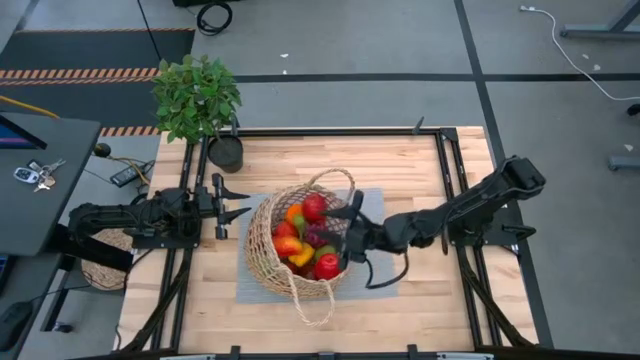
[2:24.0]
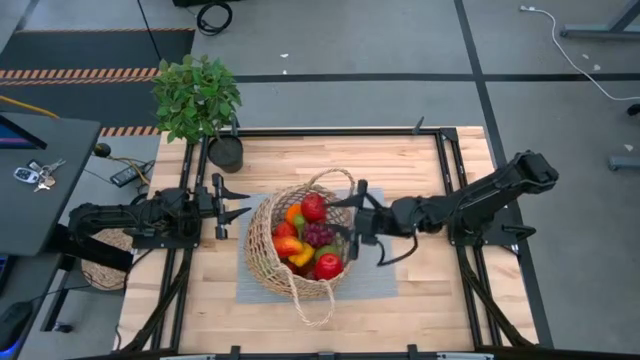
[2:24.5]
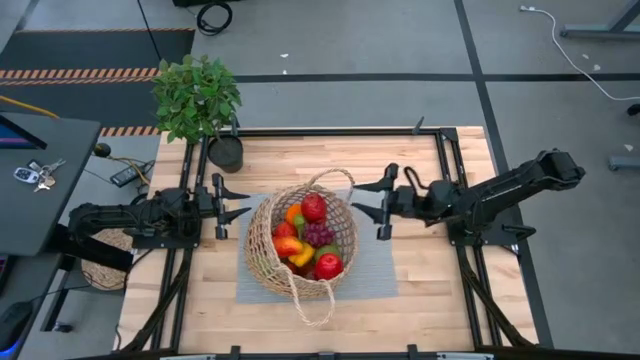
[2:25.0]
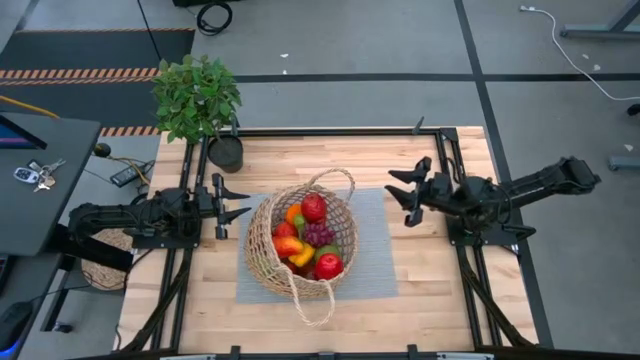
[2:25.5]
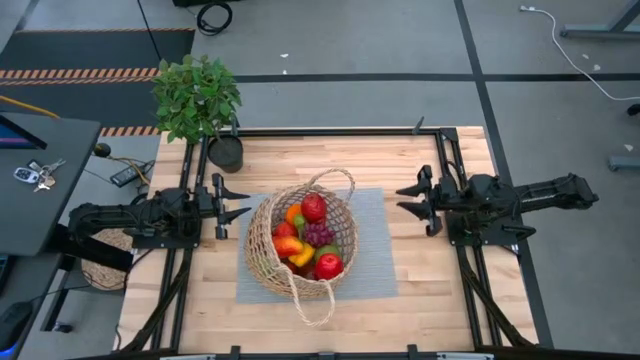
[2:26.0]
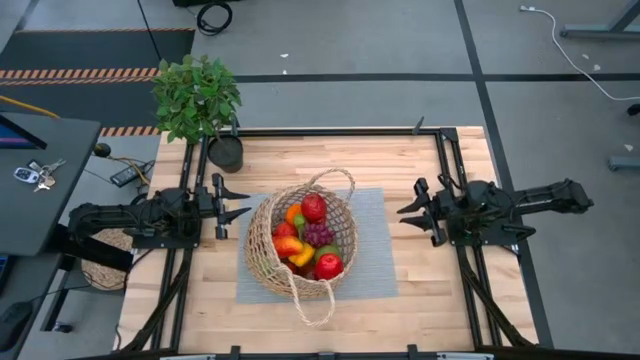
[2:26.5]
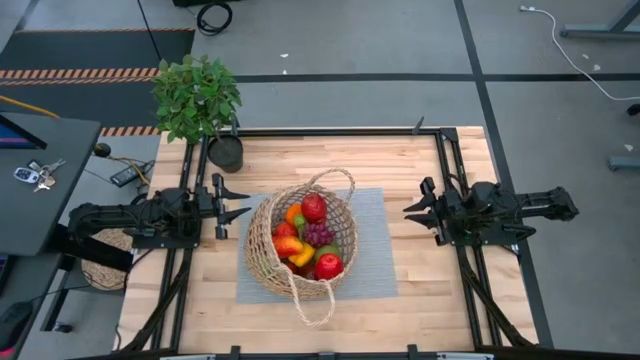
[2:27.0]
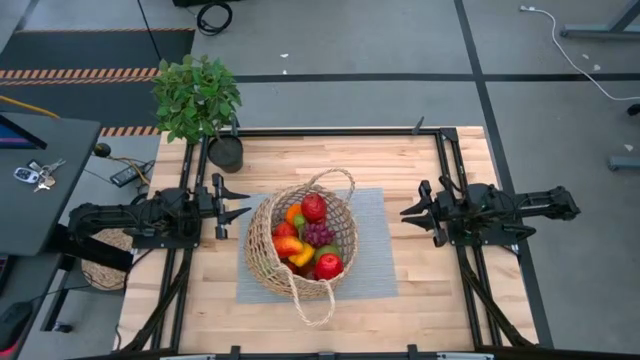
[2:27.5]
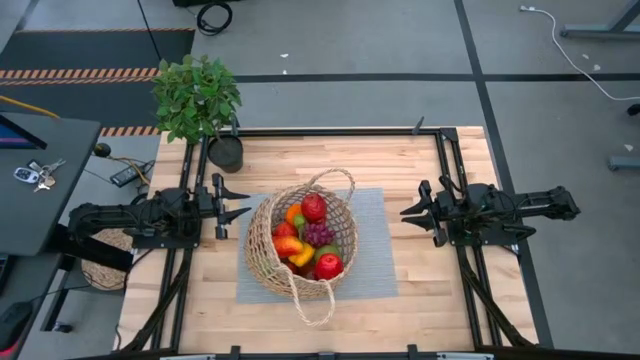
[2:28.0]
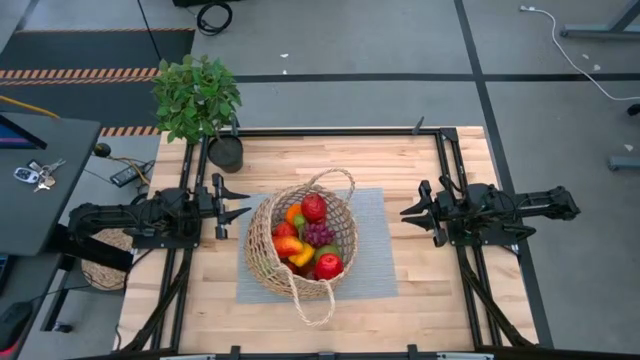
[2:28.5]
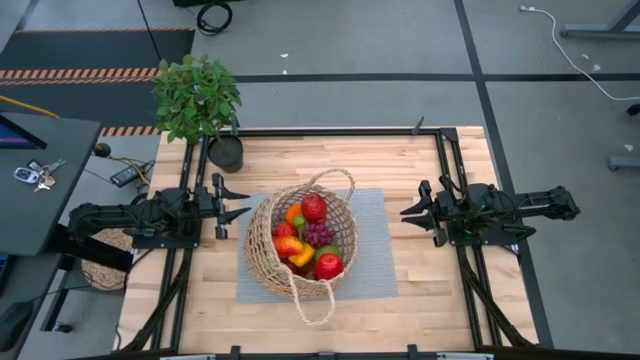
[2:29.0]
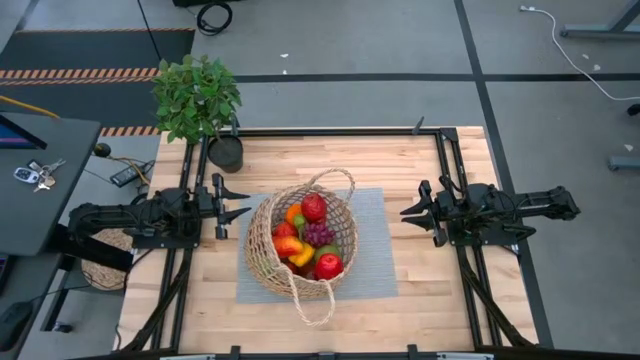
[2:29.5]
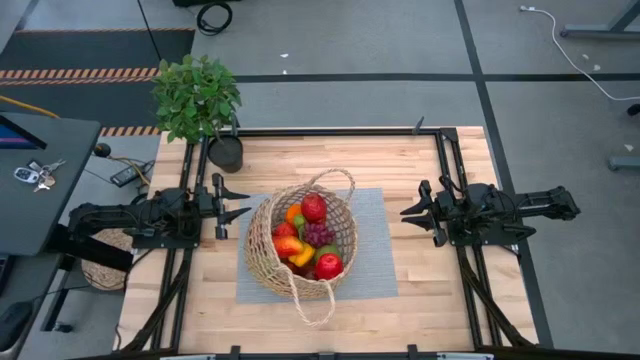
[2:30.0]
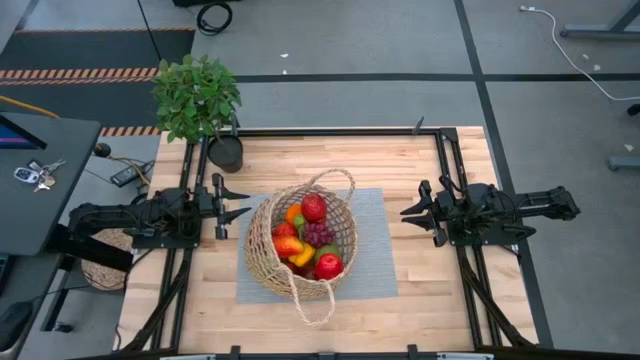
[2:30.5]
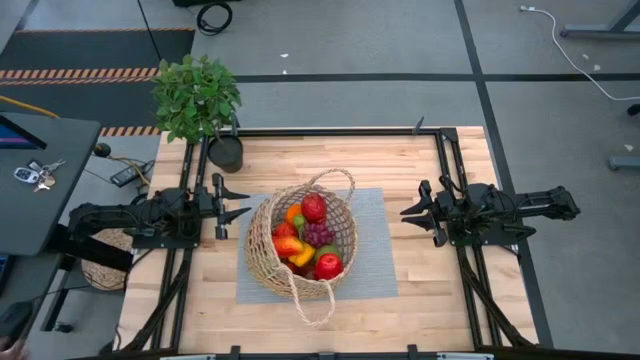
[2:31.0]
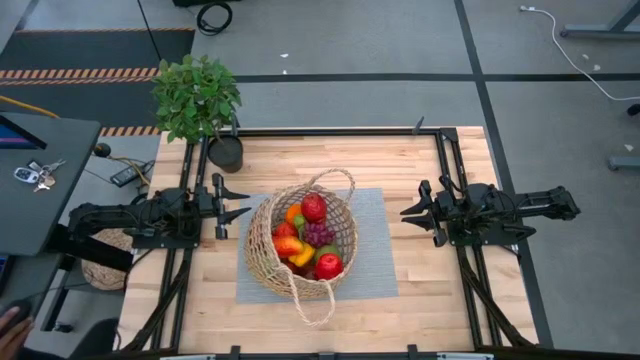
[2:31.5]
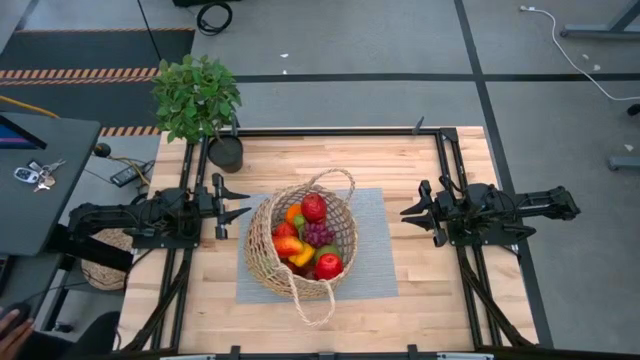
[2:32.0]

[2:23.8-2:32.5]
Task: Build produce basket
Return to Home Position

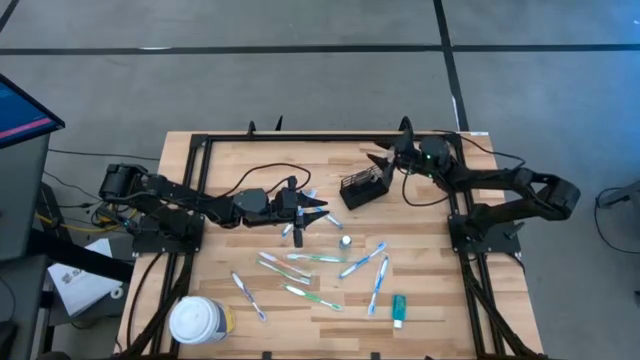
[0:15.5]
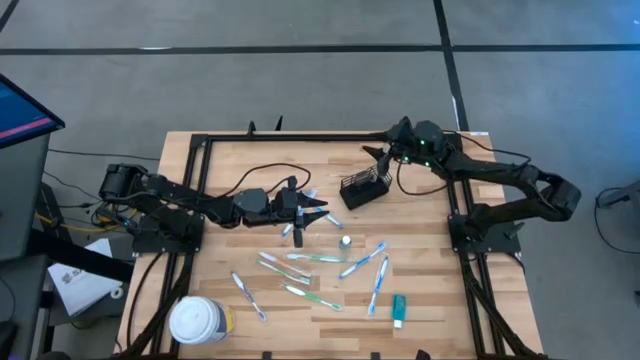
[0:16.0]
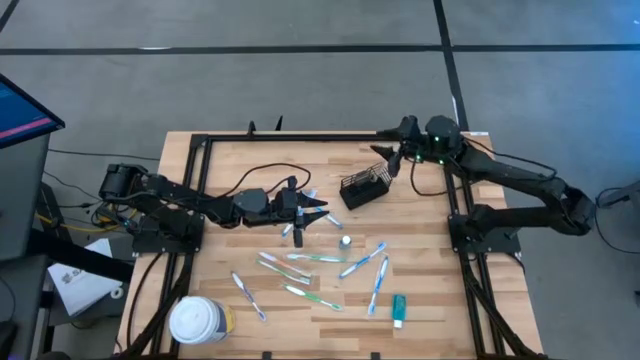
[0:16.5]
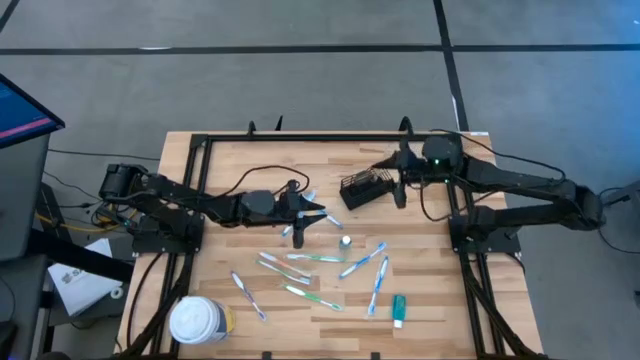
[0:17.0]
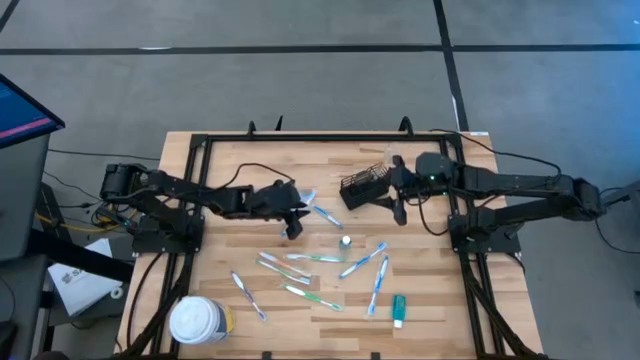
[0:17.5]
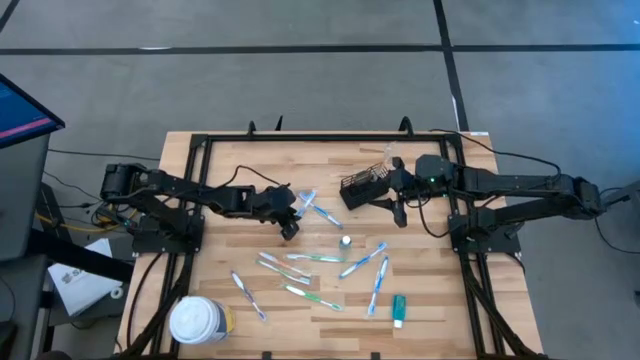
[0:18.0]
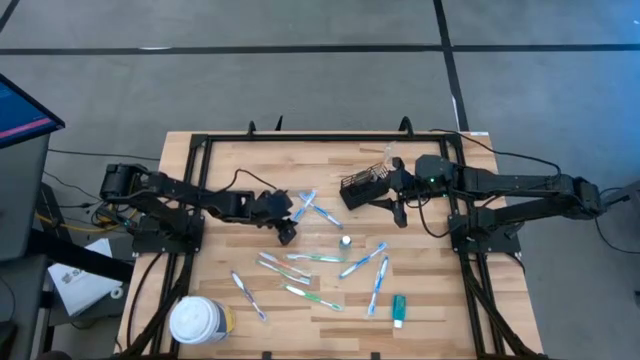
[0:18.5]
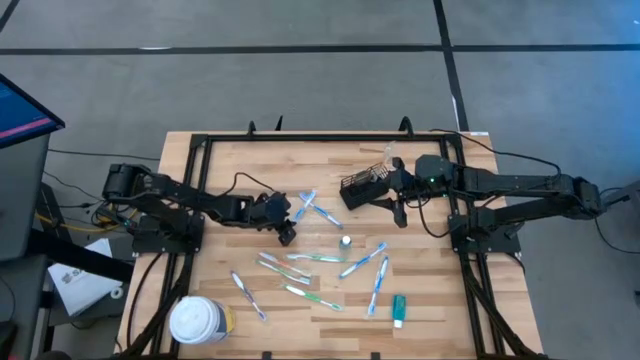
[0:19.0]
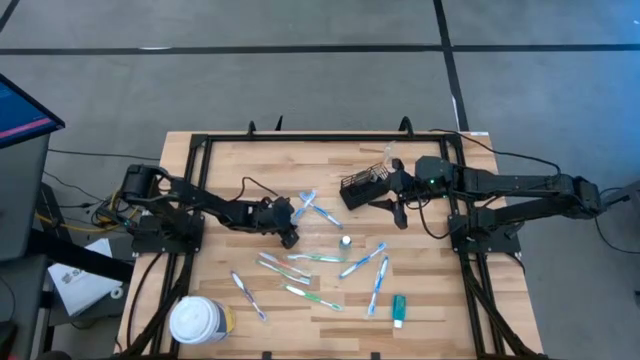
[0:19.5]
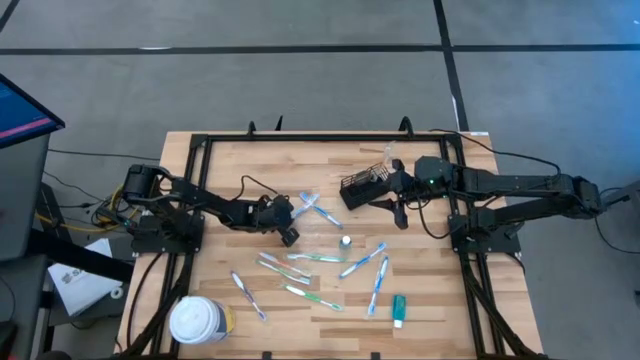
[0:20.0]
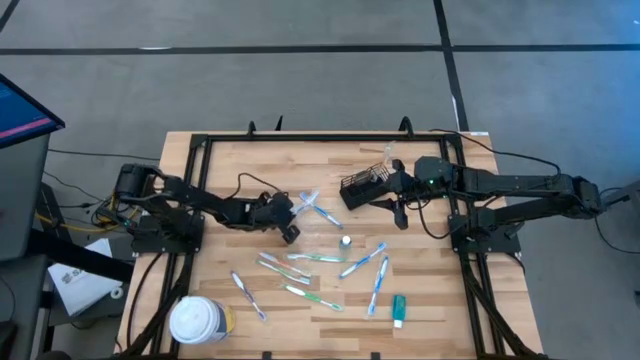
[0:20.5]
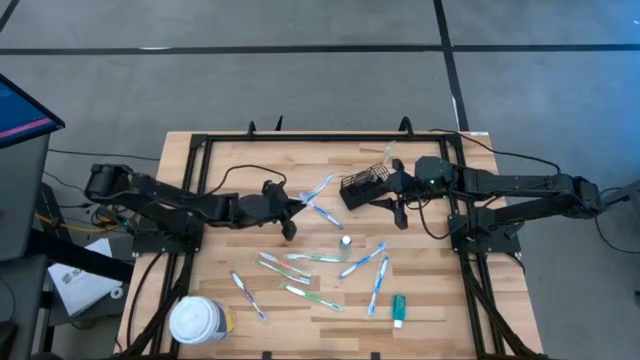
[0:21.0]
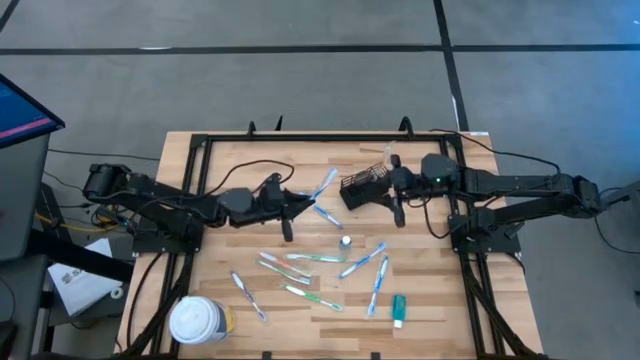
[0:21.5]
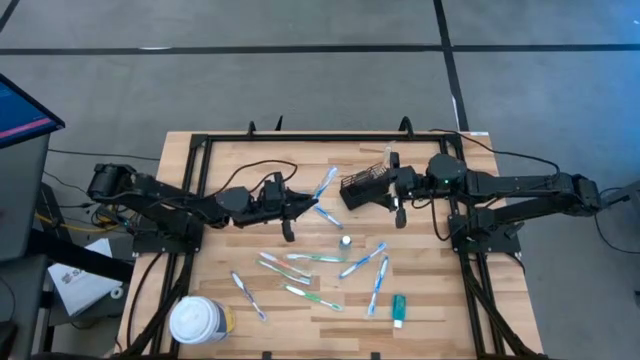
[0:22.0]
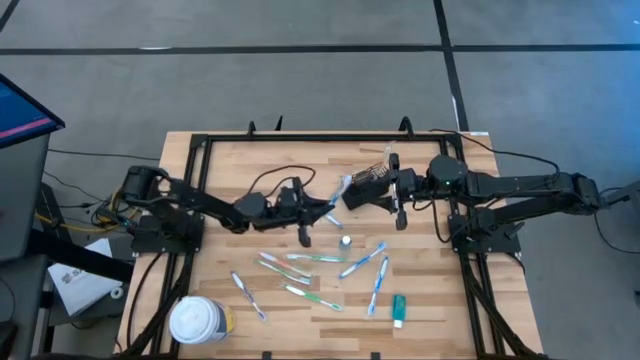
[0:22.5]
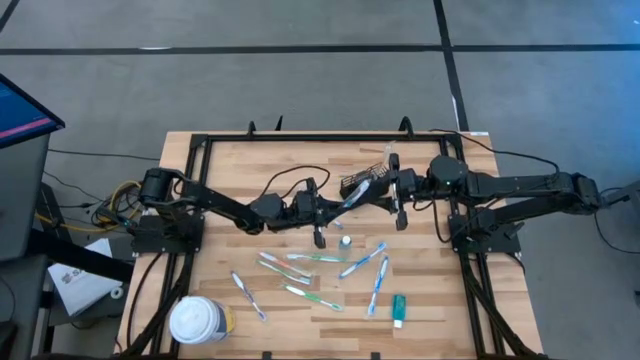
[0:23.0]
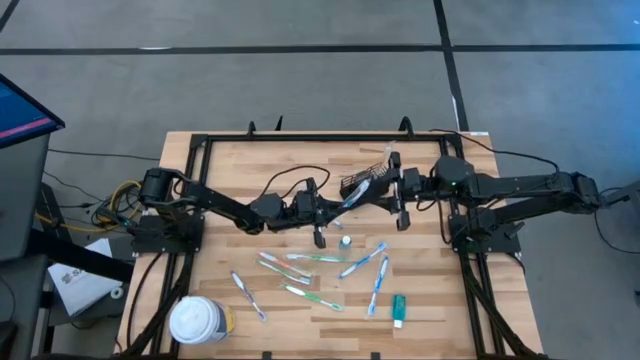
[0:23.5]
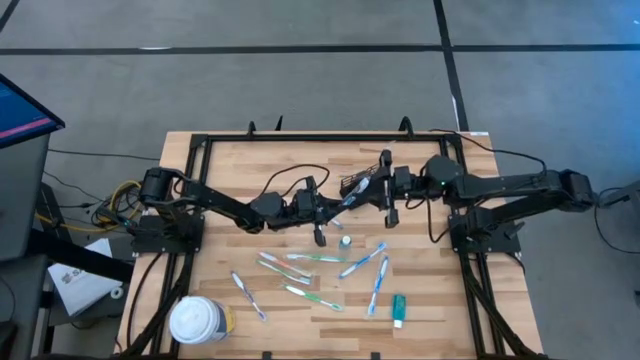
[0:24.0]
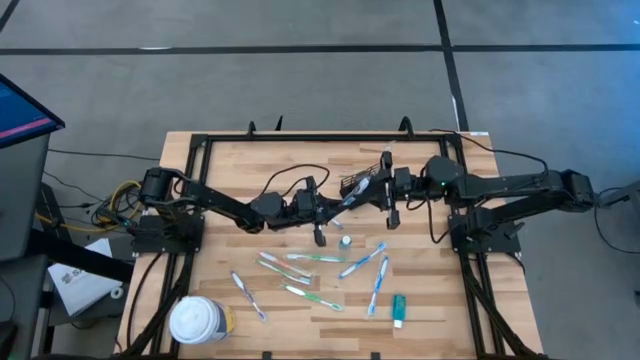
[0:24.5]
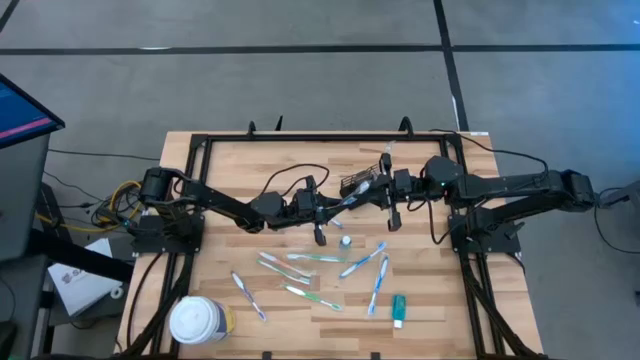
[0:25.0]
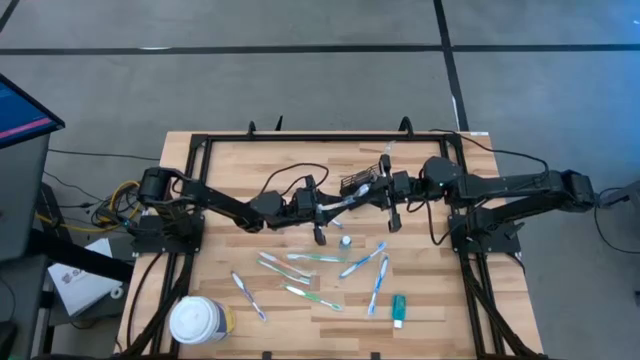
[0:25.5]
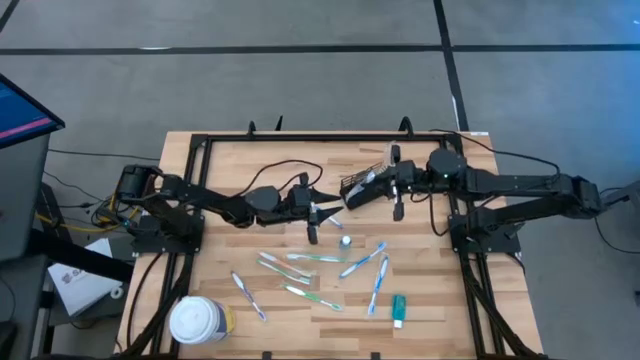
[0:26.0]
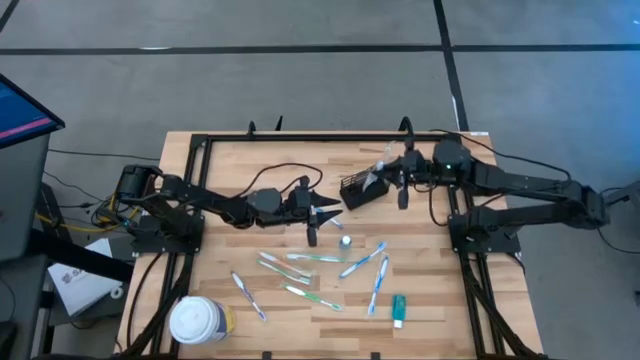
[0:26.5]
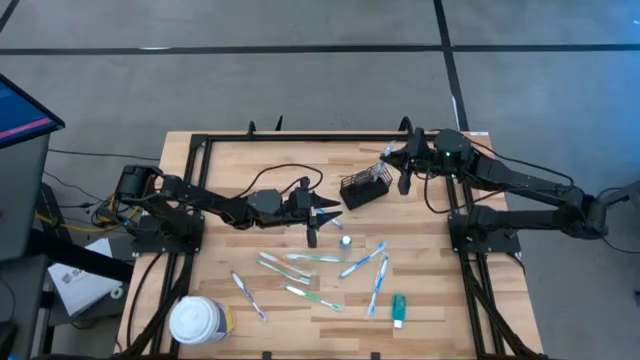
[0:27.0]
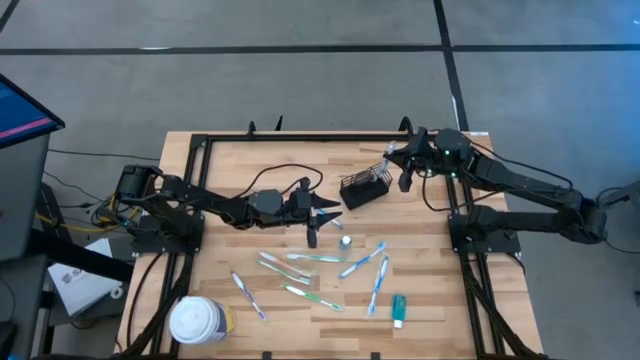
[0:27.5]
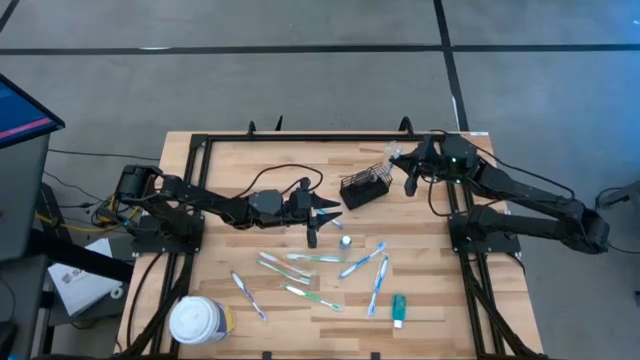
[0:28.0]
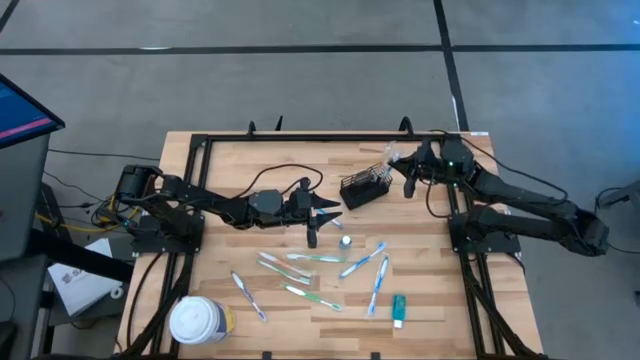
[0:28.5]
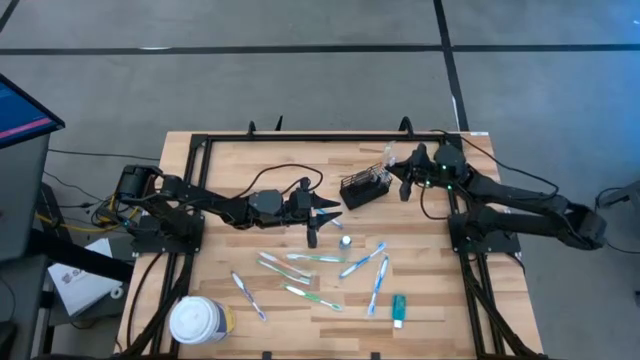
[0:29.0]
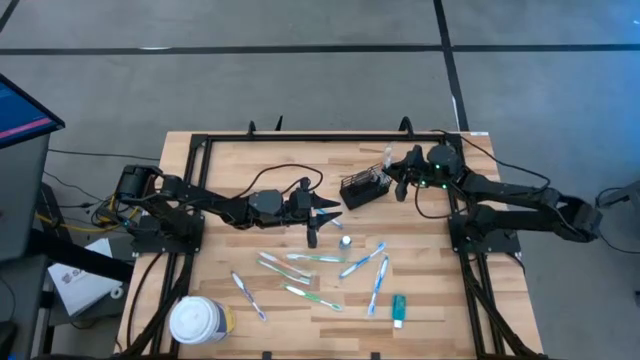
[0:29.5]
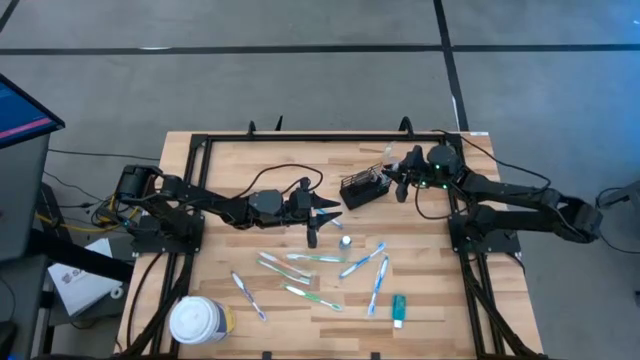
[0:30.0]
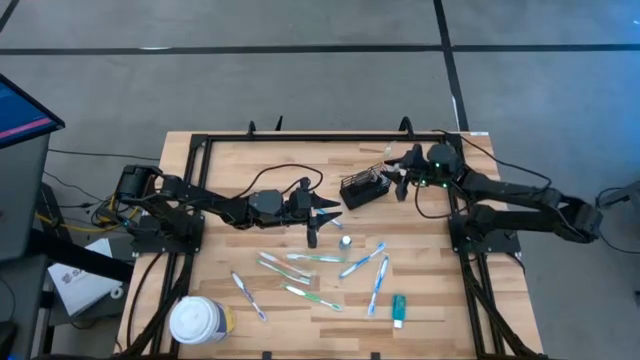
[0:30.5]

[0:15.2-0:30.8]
Task: Pick & Place toothbrushing station
Put the blue toothbrush into the mesh organizer
